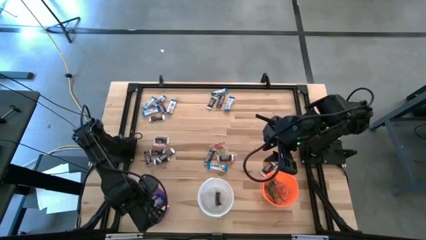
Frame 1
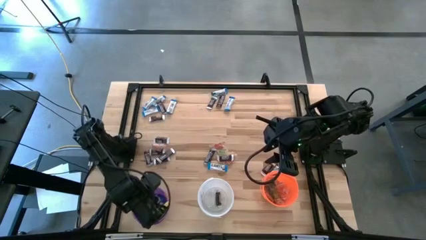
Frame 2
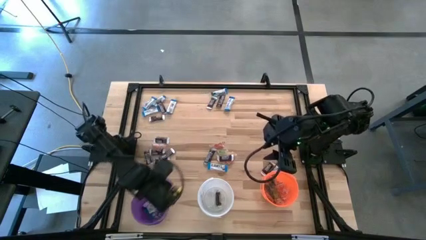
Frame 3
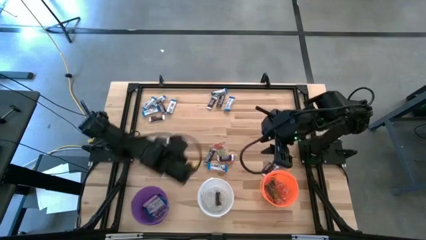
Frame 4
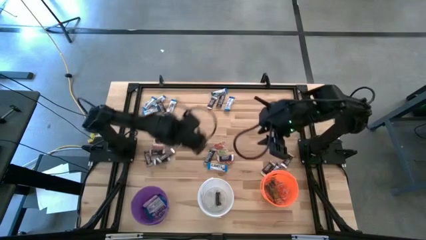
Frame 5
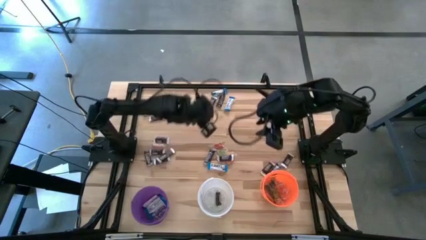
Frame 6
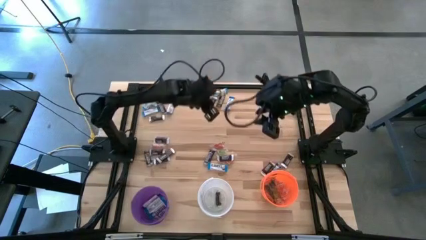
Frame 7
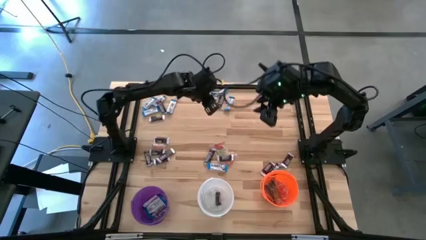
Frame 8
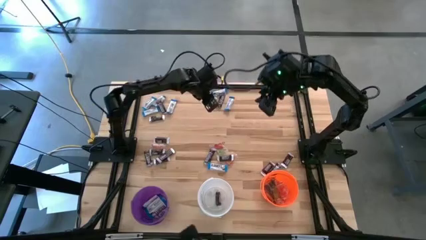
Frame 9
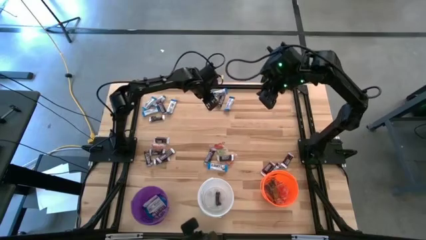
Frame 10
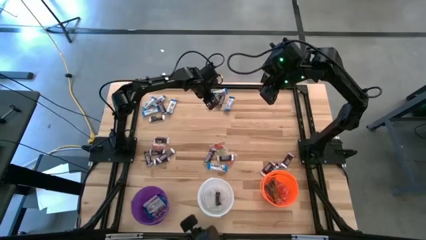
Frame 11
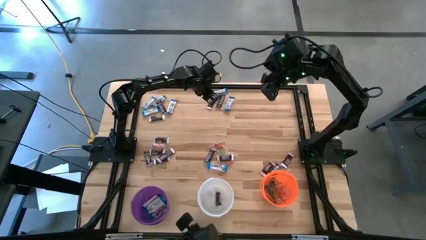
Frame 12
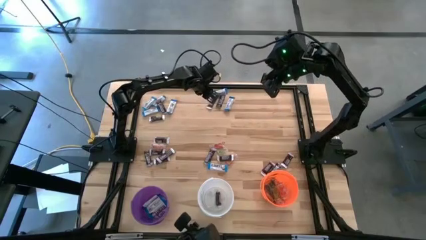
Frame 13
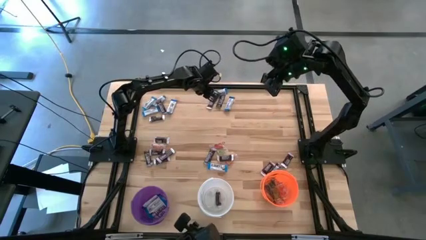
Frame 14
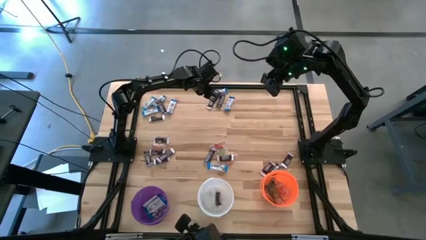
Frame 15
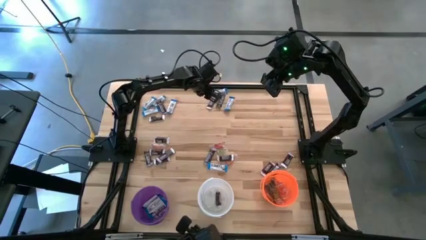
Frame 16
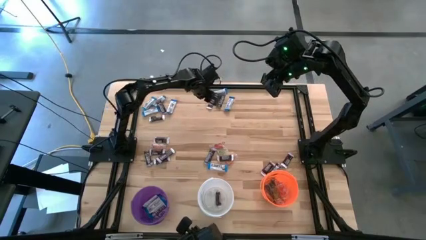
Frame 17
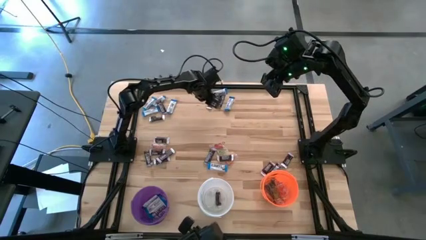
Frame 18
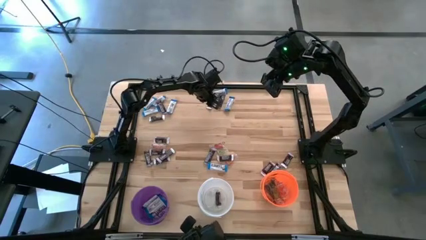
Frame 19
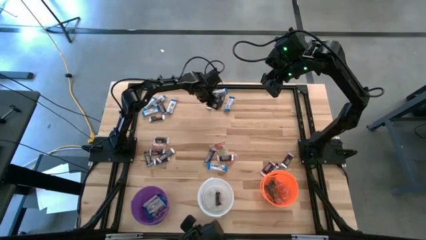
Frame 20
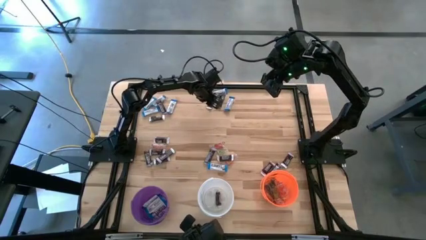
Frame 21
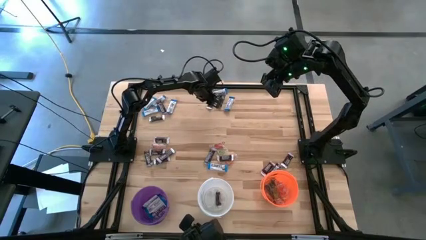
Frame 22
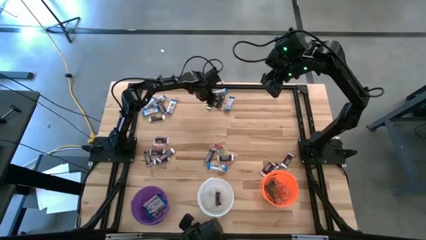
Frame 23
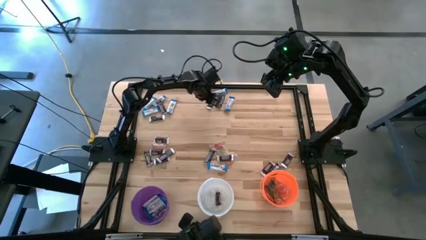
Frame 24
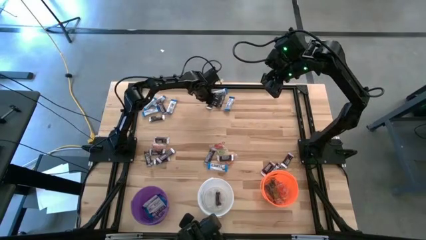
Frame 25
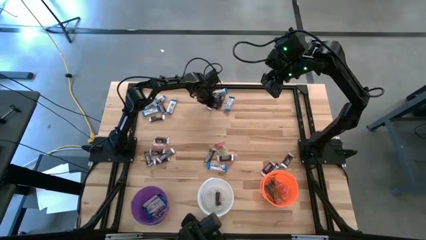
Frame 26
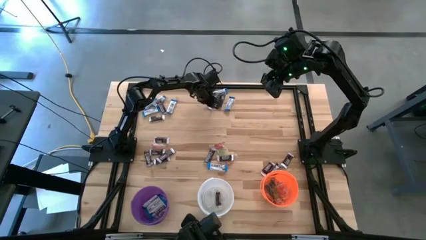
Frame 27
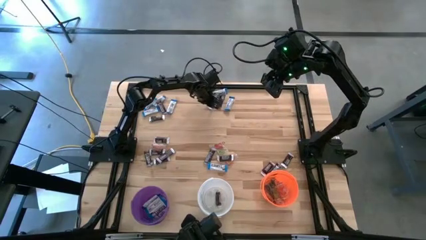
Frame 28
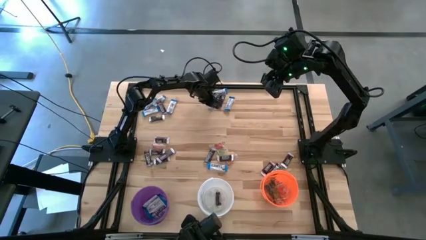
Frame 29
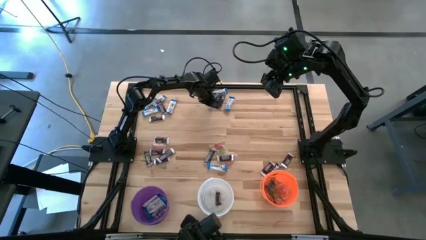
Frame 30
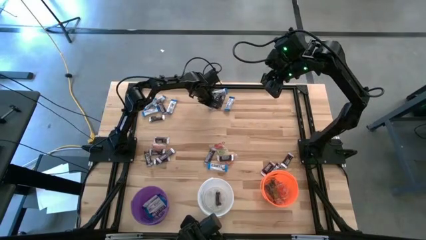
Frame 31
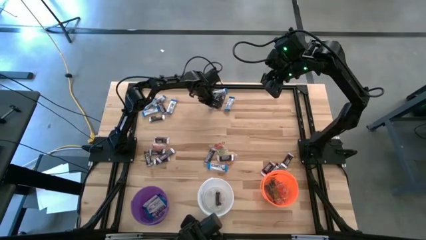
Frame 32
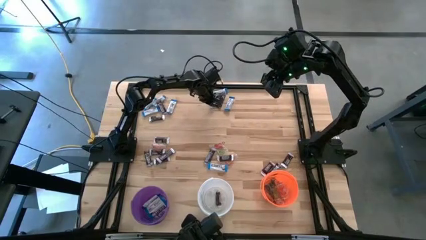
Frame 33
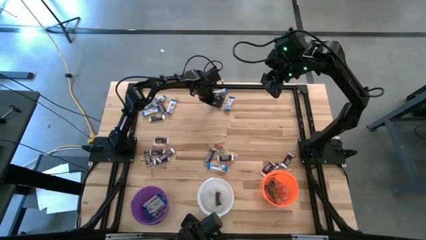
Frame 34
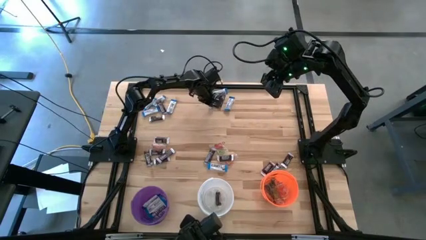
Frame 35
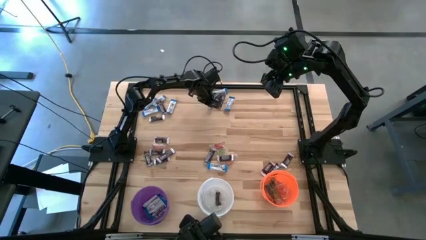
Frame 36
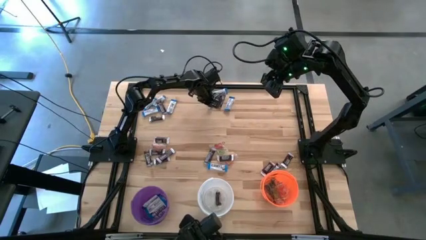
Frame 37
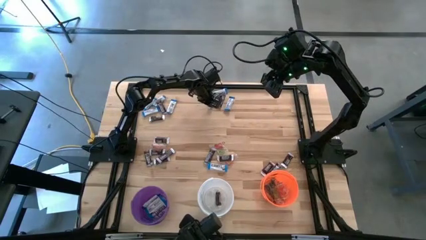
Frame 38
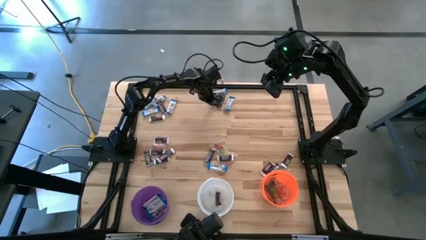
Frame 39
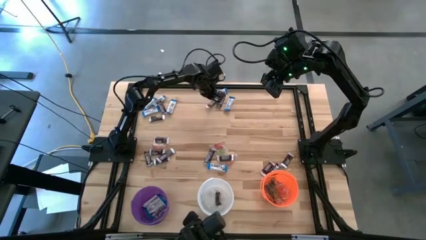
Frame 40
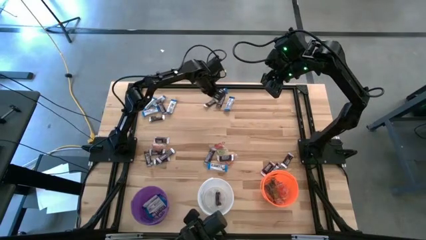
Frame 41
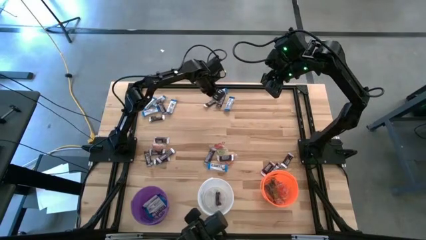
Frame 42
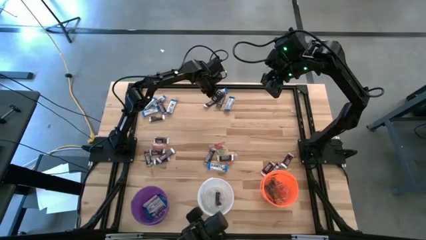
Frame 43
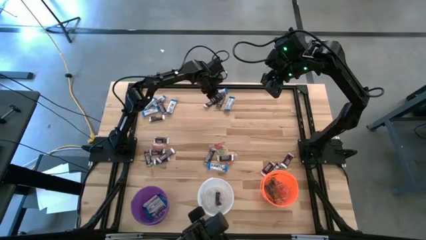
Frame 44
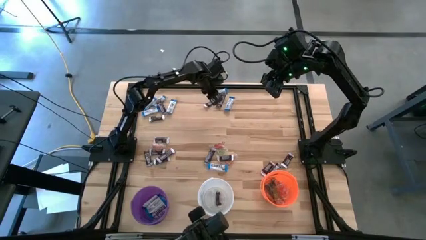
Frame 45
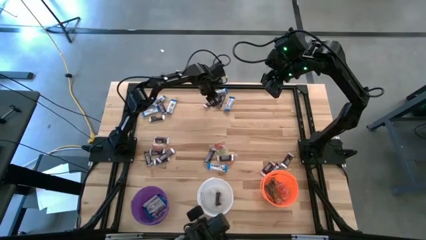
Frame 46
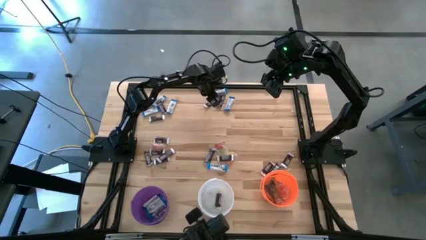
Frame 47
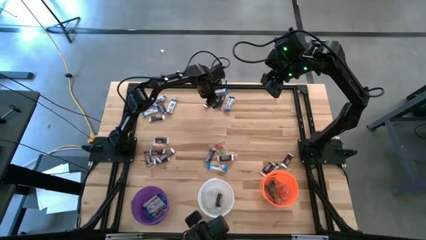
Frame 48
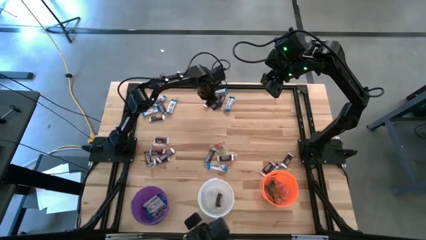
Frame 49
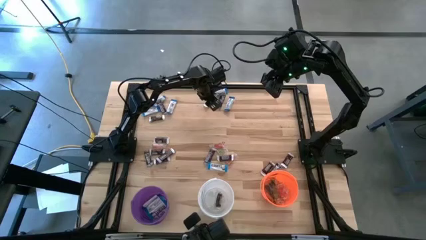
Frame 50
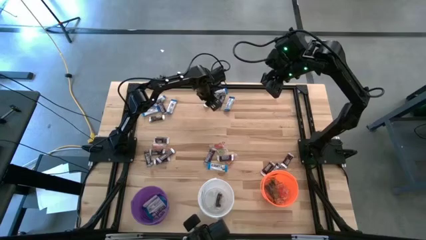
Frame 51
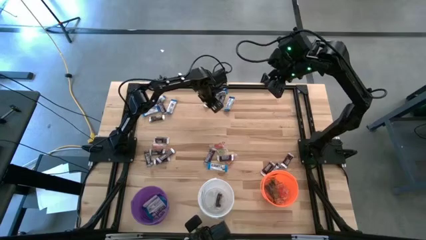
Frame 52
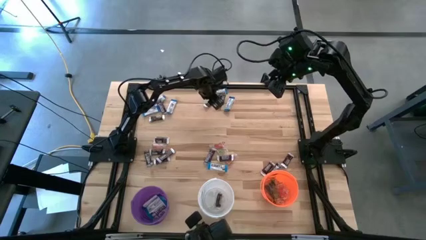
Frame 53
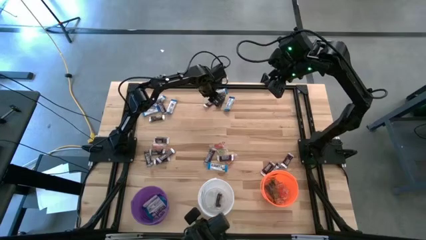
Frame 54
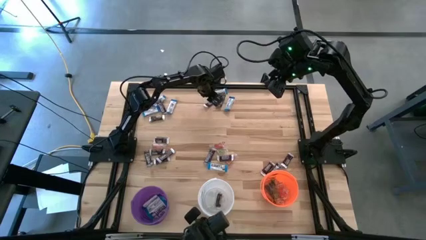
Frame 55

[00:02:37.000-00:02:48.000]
Task: Sort candy
Put the brown chocolate into the white bucket

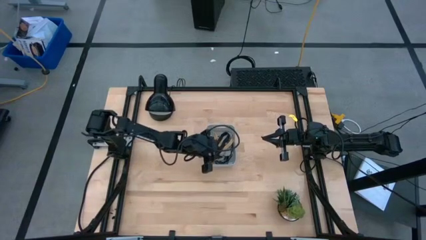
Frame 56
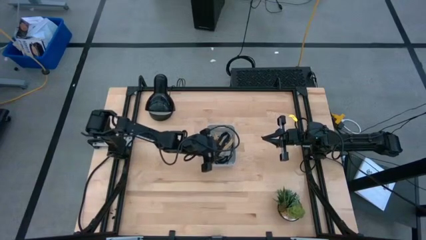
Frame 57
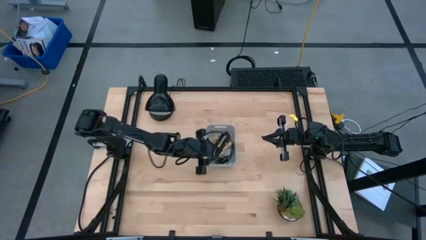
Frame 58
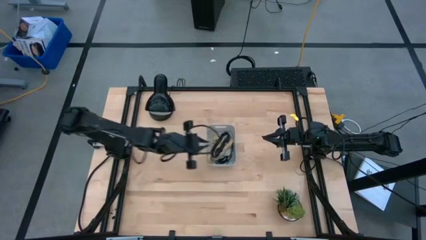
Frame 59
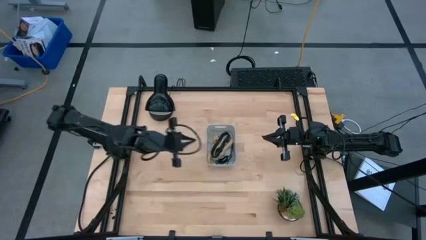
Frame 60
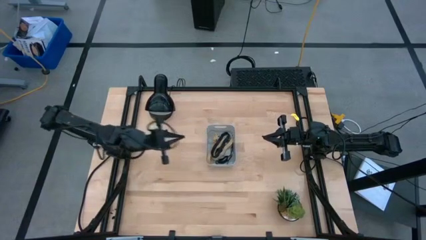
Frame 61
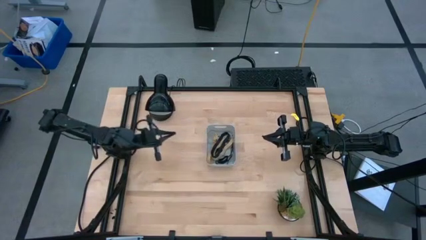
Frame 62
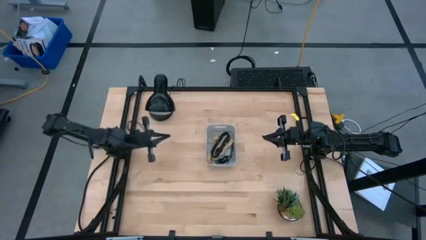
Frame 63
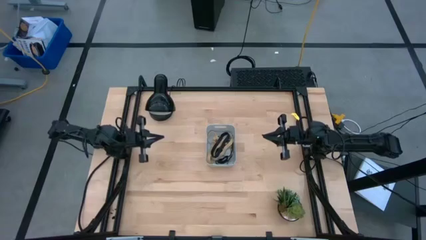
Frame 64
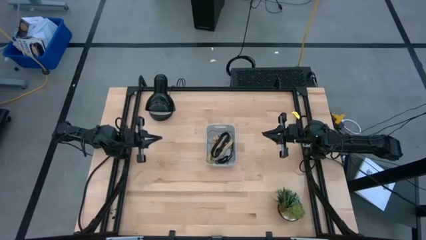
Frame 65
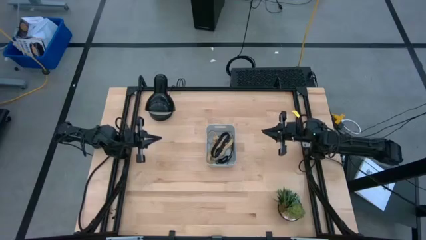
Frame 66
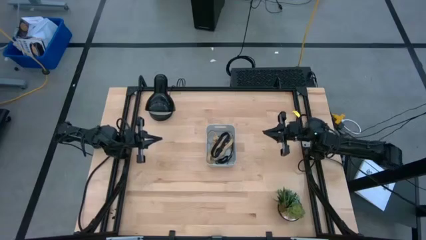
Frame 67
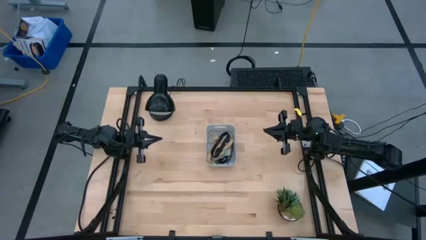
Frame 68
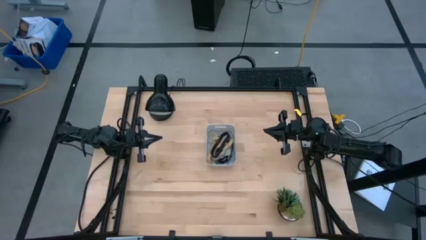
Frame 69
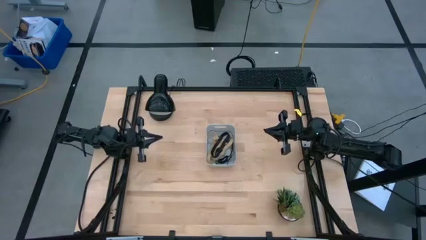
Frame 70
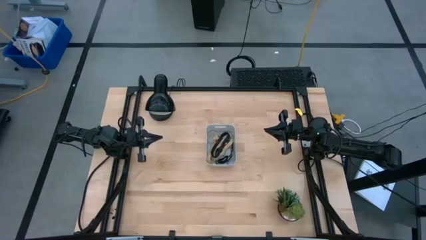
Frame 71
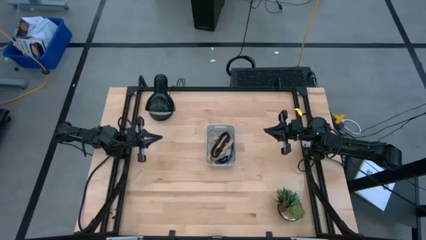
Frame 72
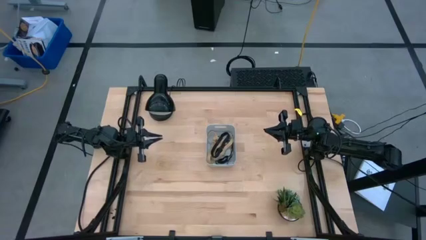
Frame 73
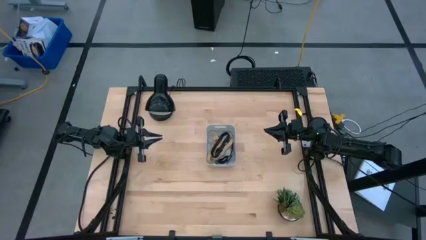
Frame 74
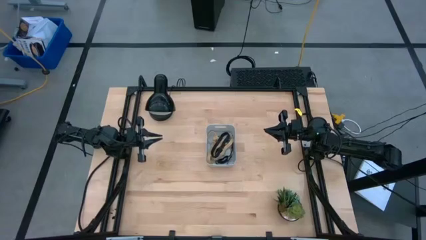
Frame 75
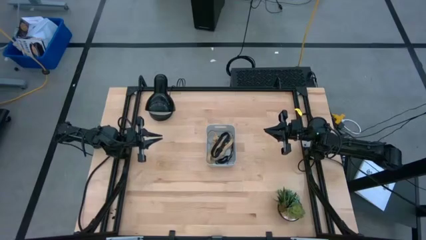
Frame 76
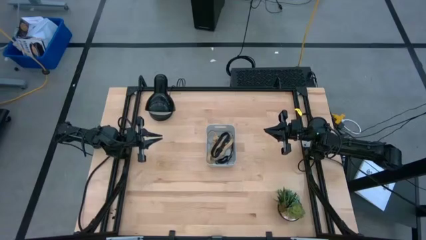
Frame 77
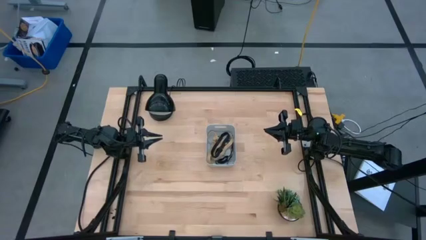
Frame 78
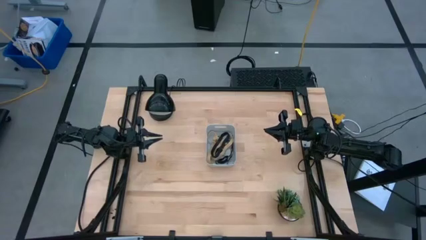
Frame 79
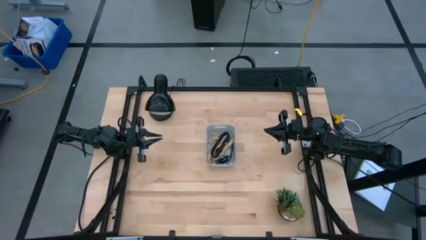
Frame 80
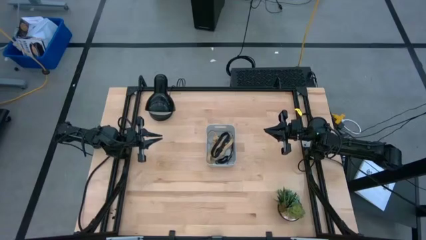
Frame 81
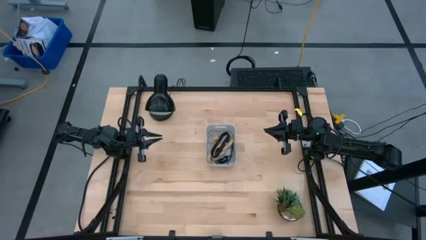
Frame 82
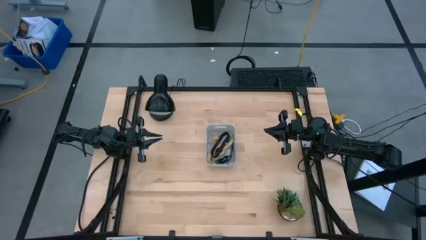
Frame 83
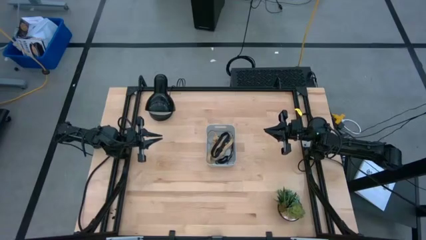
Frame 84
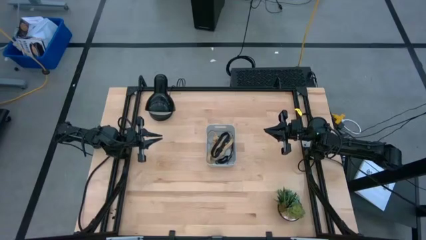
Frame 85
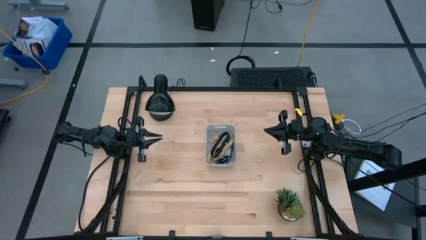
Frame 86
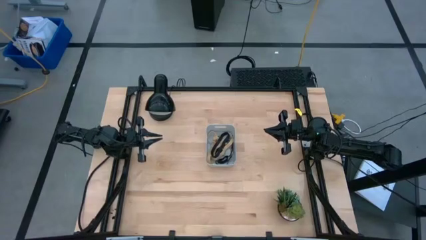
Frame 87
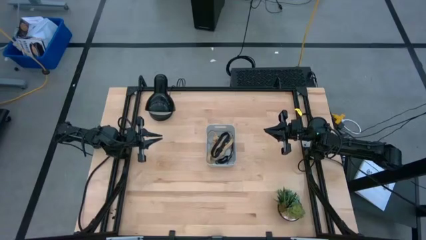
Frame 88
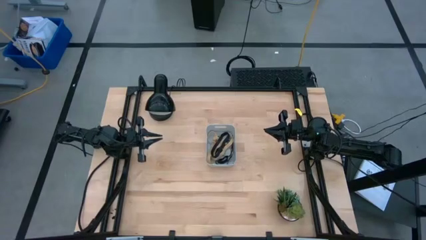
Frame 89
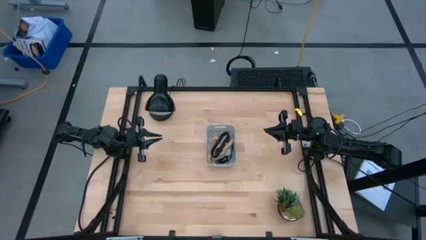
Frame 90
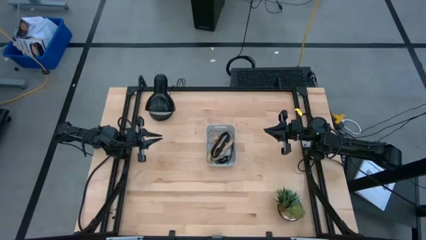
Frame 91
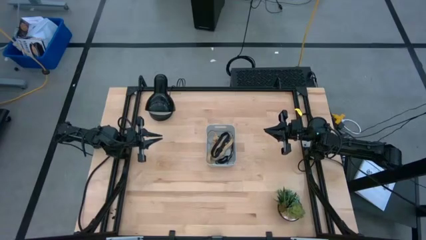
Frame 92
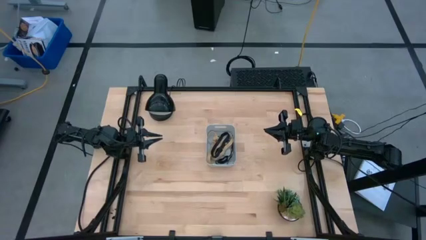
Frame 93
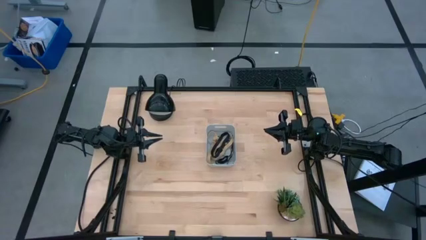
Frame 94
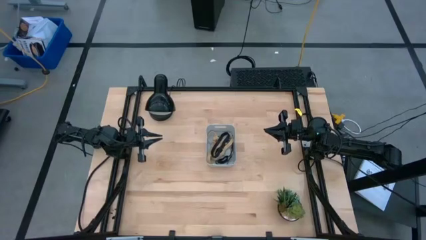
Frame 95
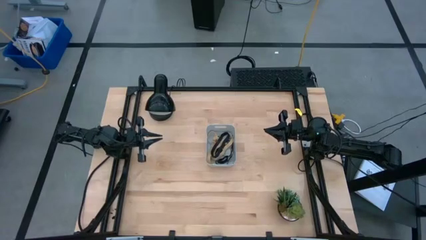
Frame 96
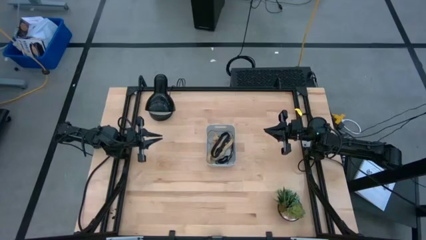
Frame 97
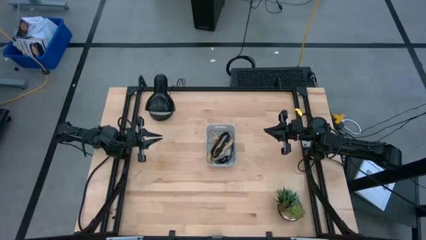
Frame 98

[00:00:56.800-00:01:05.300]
Task: Pick and place rubber bands into bin
Return to Home Position
